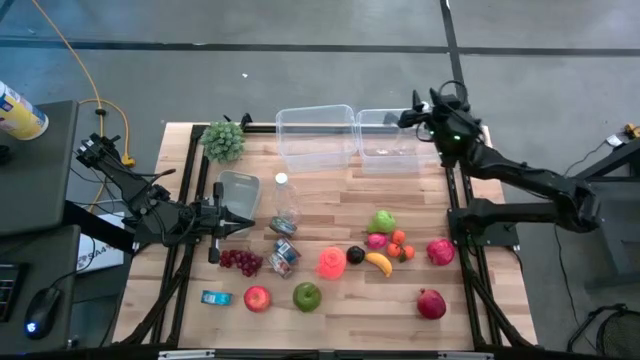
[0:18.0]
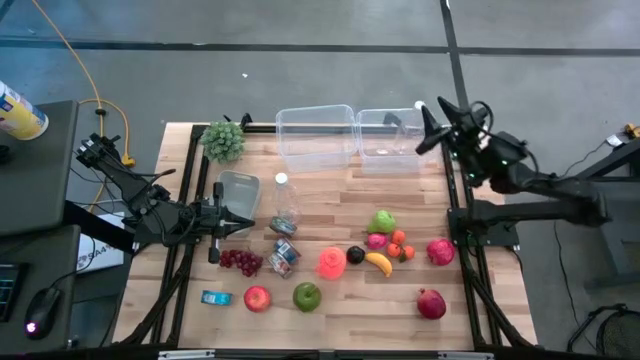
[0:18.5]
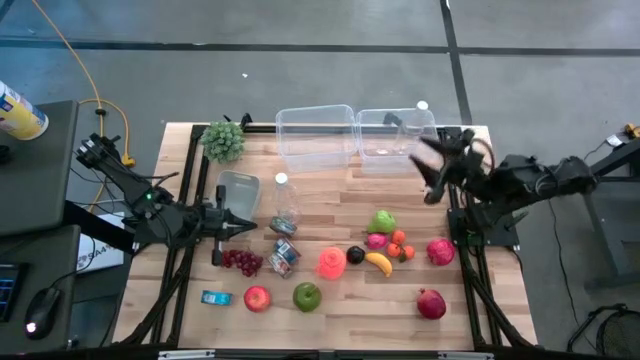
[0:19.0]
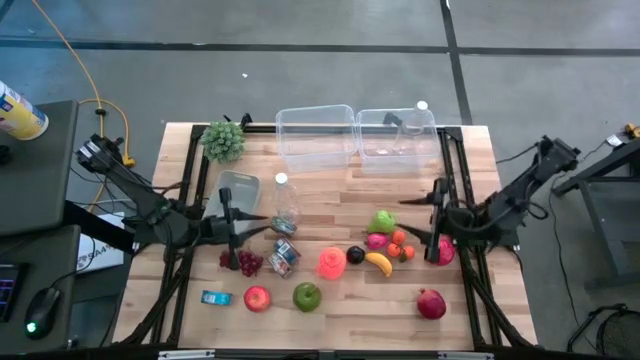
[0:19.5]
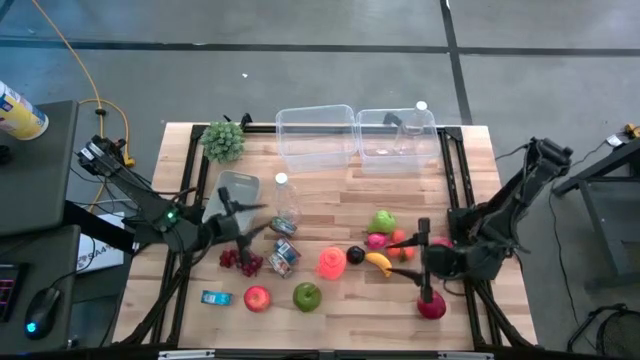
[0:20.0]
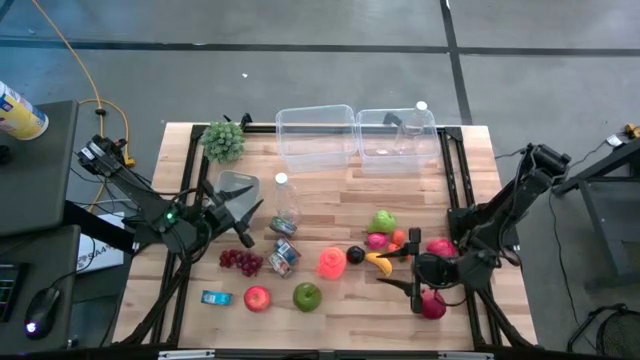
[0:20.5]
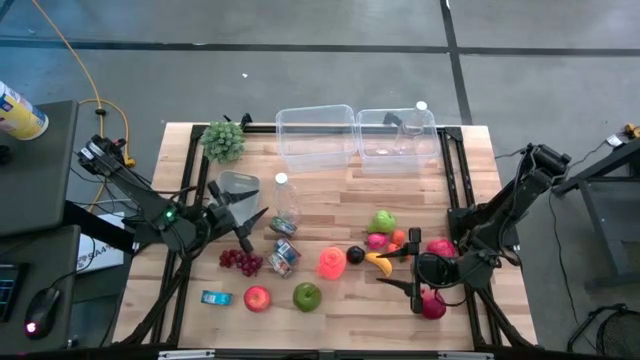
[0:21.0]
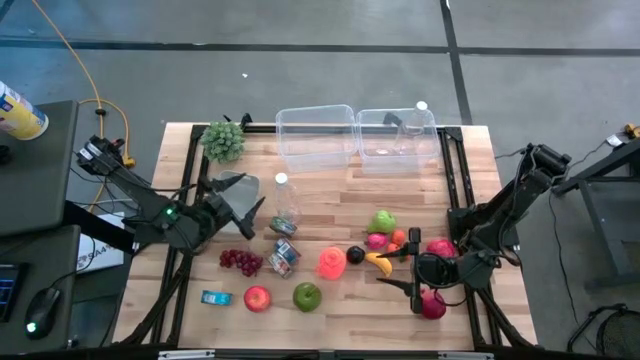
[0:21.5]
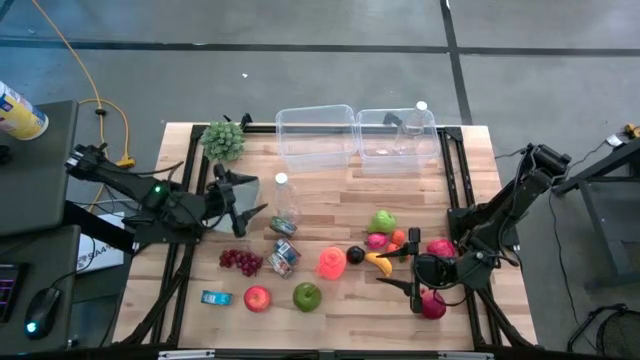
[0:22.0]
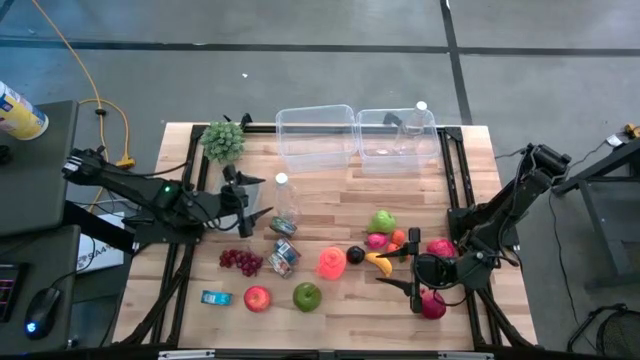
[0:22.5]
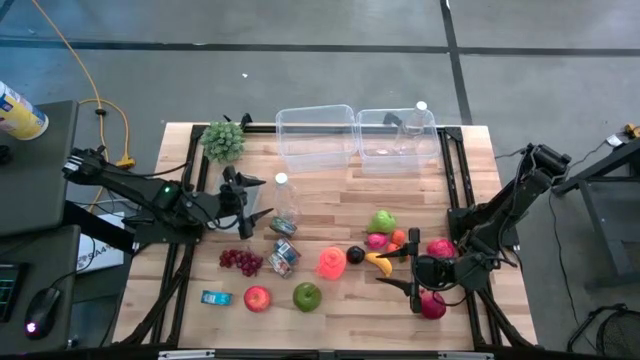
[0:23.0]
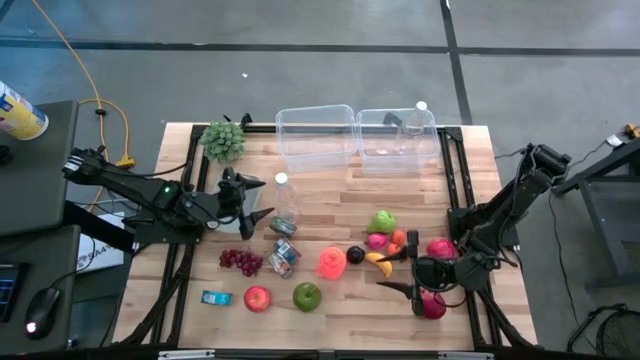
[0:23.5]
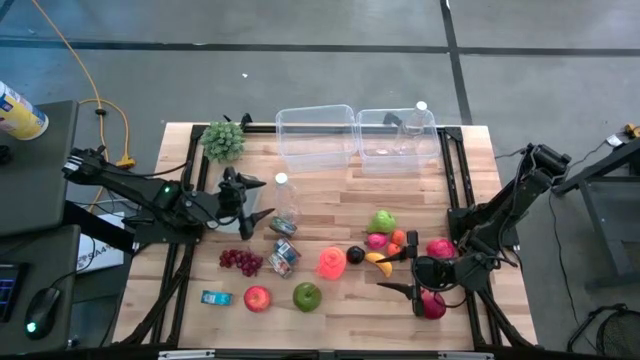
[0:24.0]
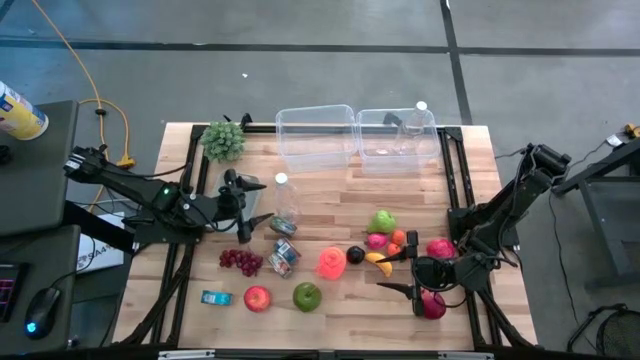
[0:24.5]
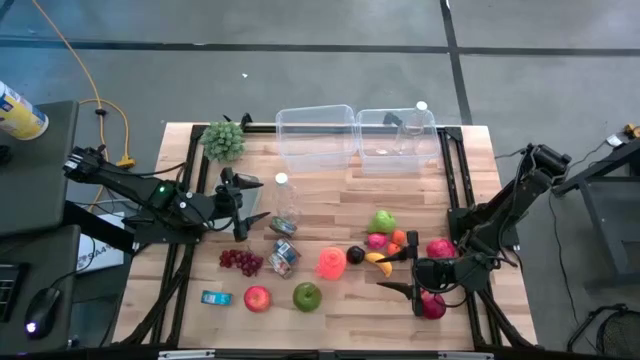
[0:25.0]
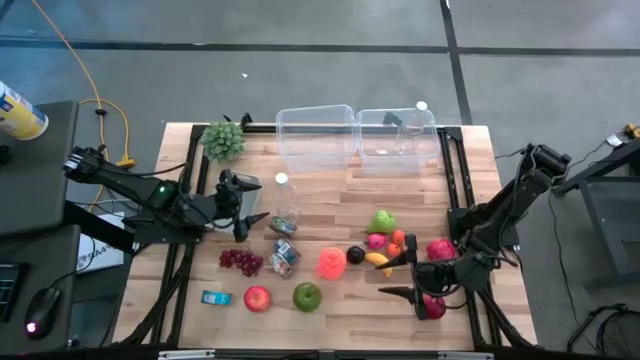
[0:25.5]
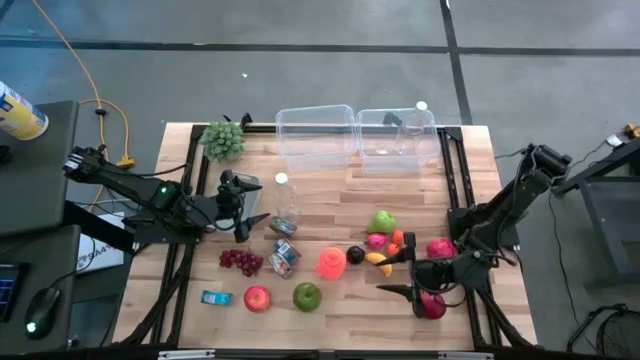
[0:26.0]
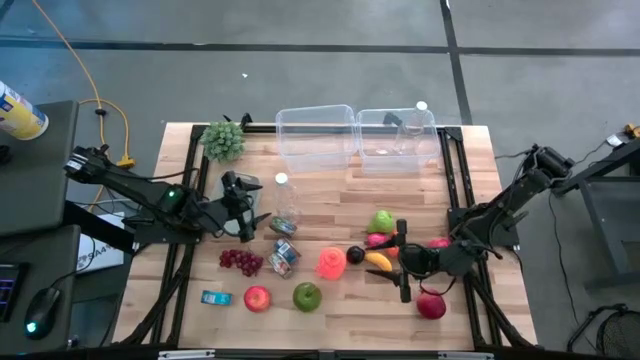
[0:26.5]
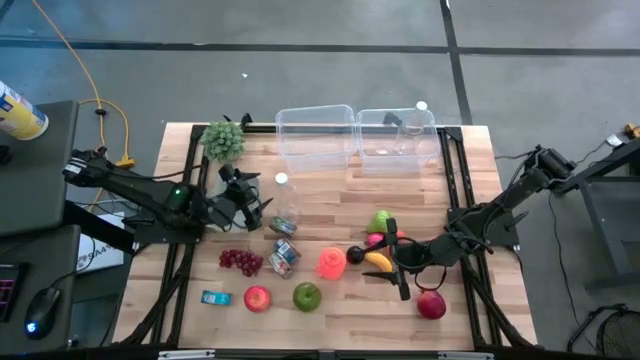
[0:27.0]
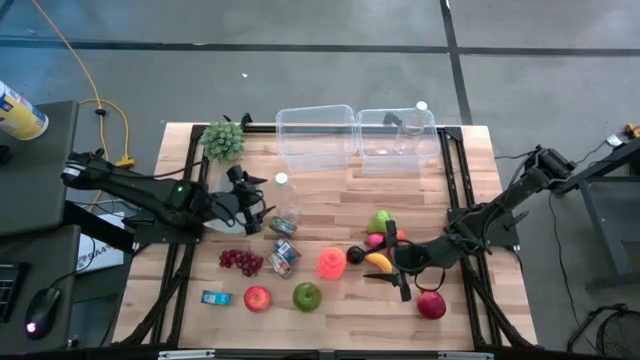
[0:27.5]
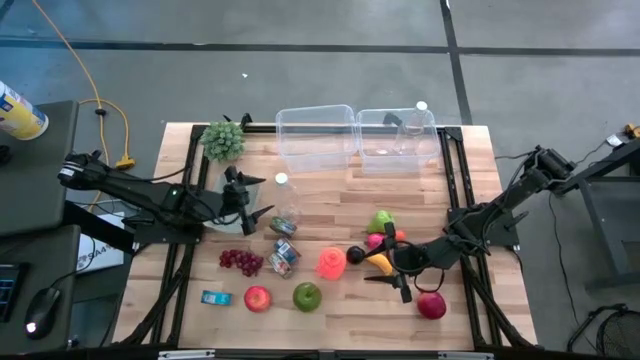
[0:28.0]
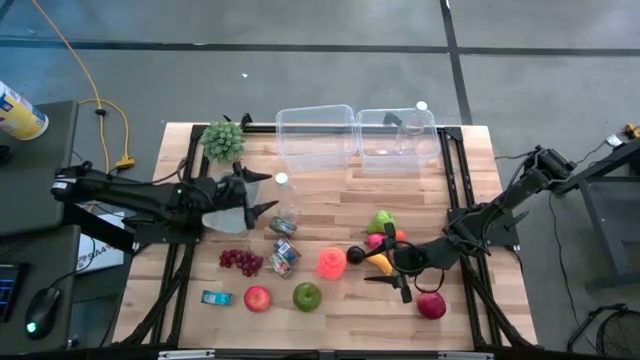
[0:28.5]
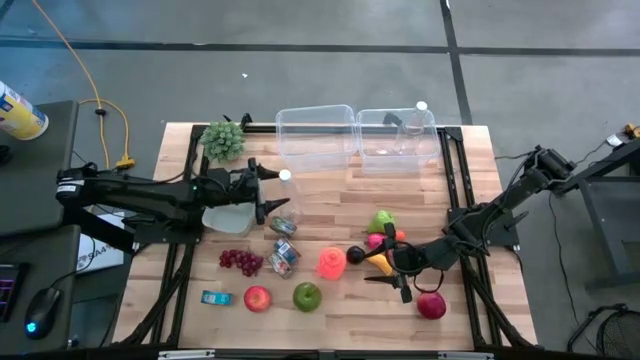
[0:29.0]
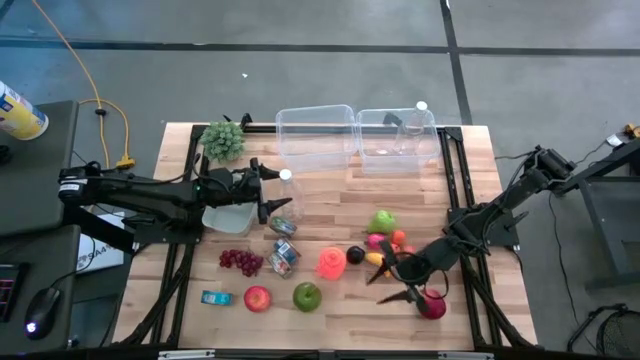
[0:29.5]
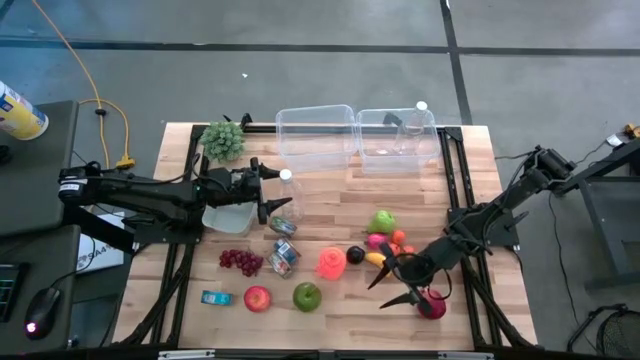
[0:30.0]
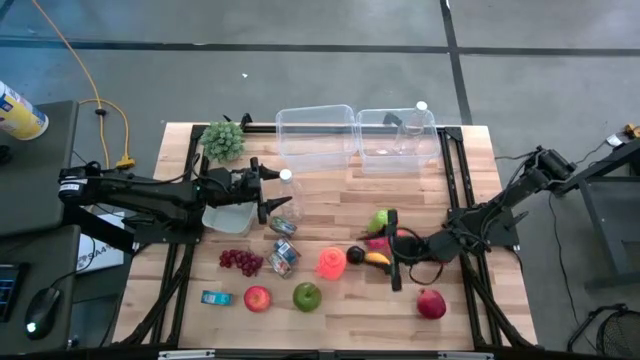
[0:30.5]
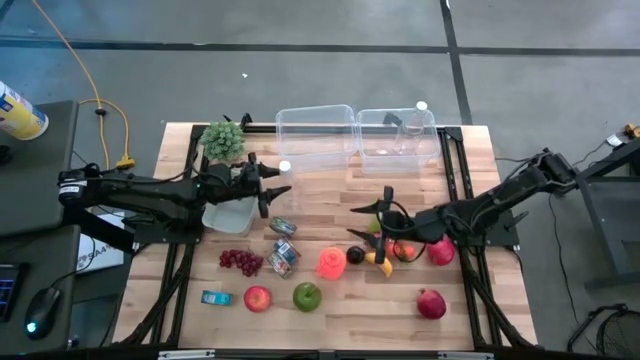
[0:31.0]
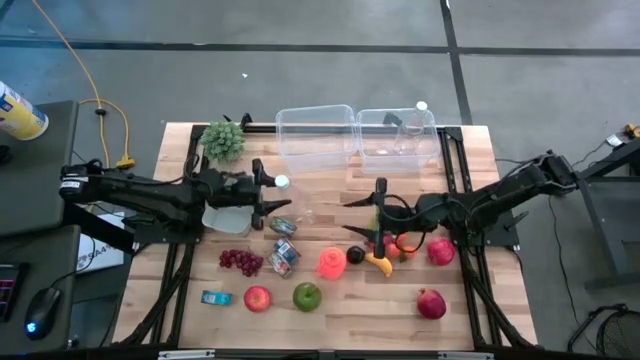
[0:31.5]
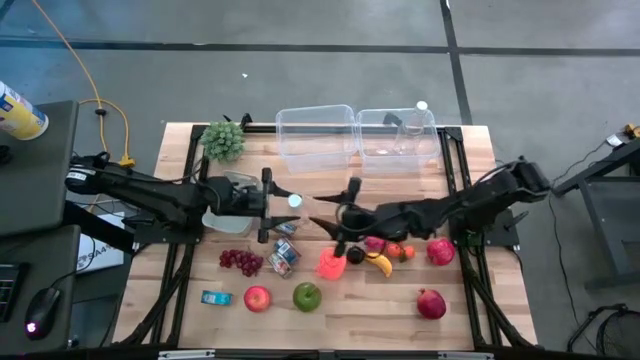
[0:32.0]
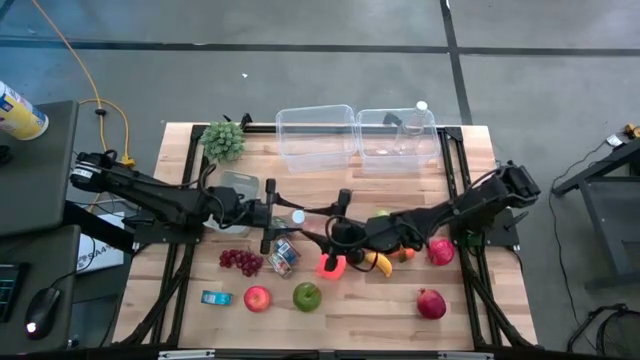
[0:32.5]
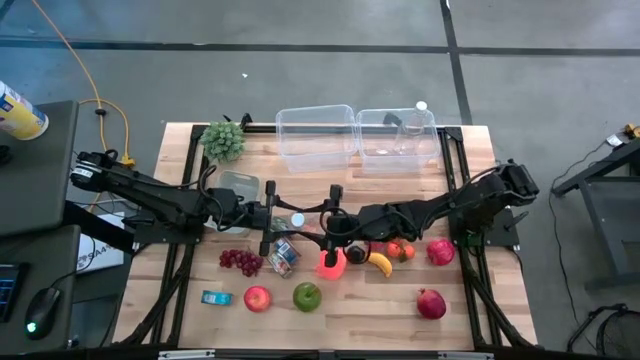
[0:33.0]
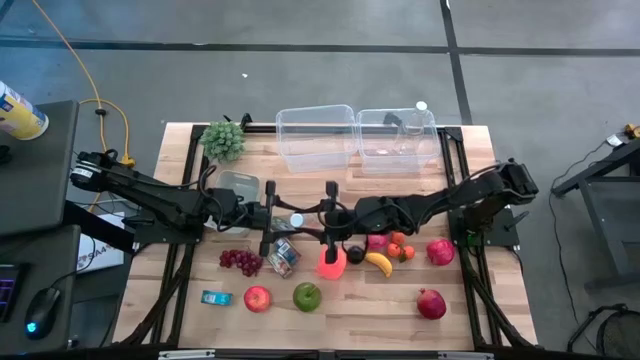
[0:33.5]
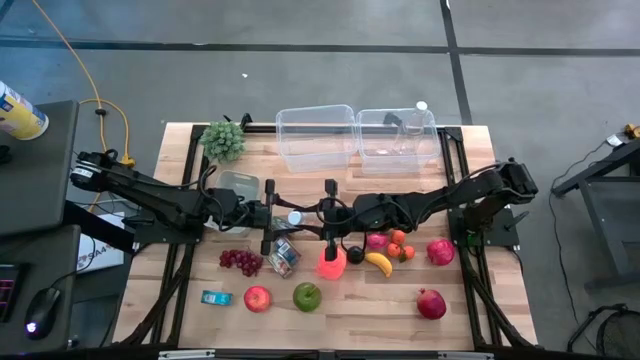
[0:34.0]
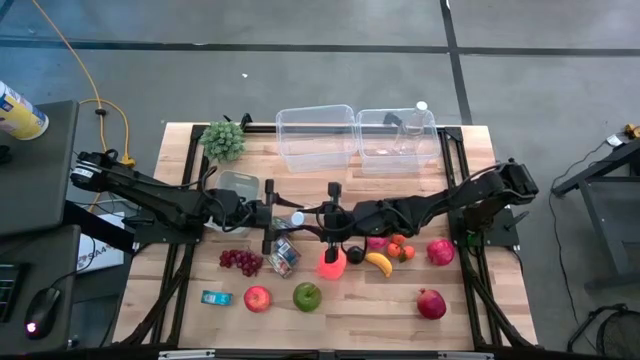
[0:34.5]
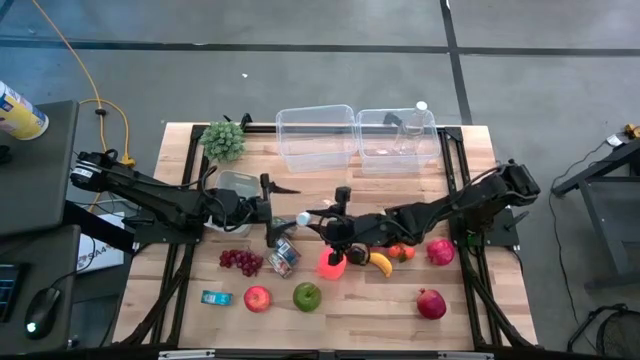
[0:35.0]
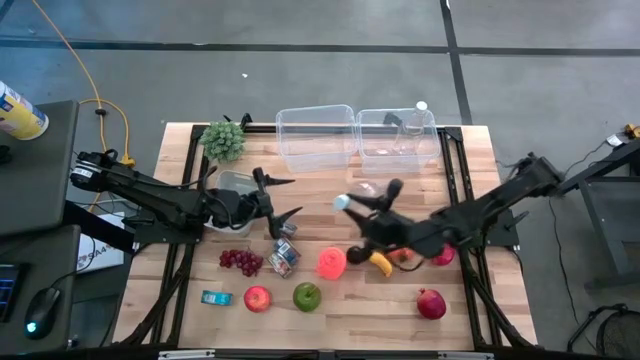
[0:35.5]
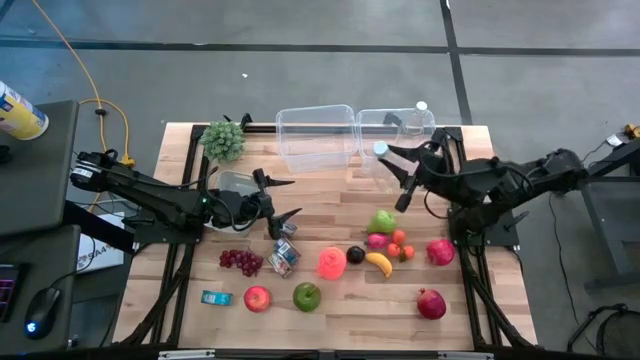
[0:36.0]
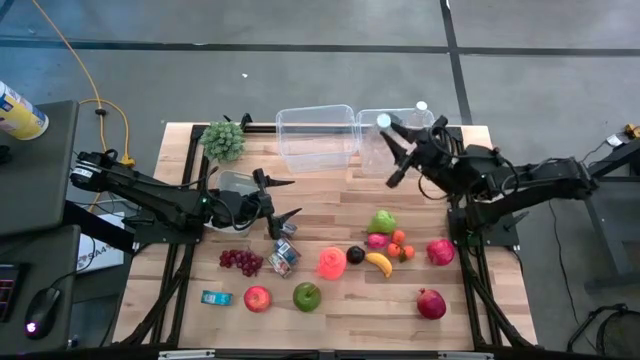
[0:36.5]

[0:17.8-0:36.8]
Task: Pick & Place Food Item
Put the transparent bottle into the right transparent bin

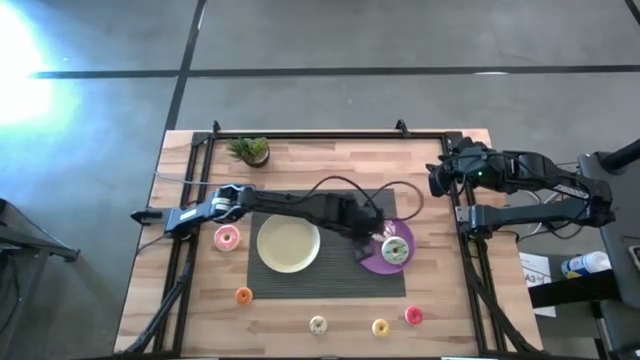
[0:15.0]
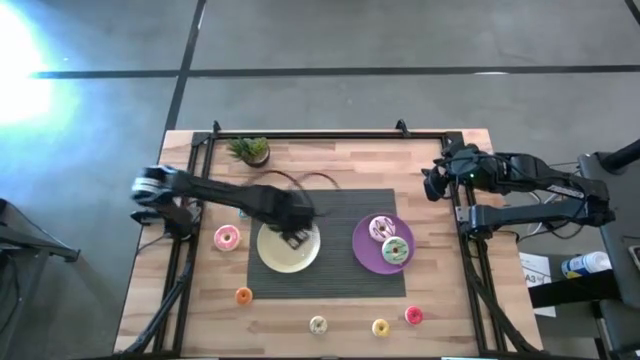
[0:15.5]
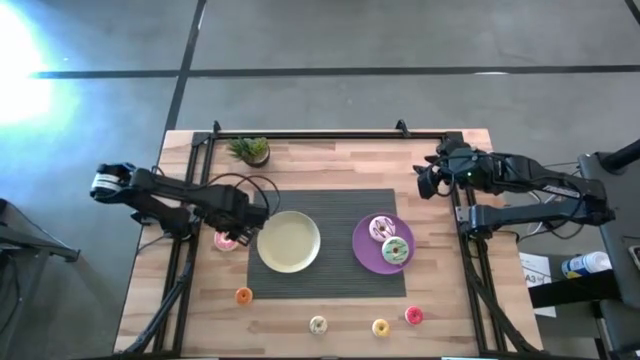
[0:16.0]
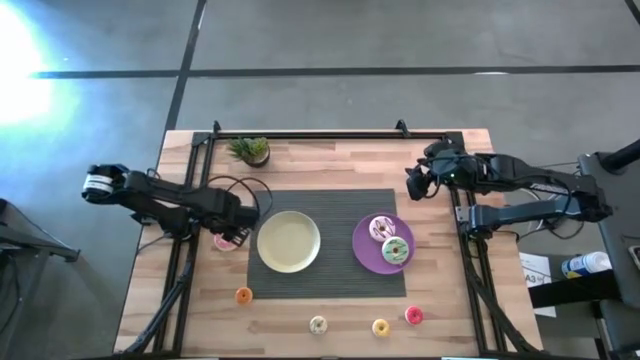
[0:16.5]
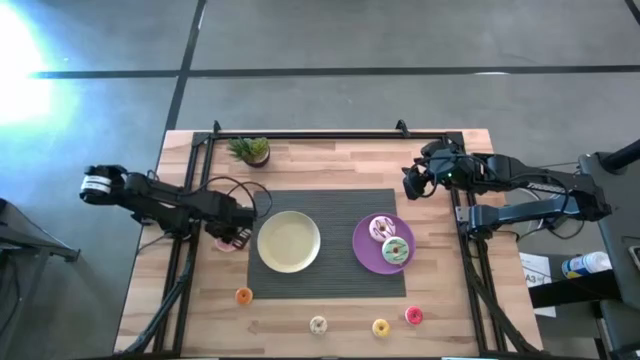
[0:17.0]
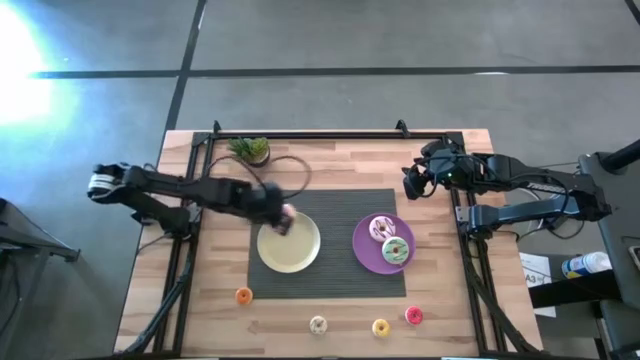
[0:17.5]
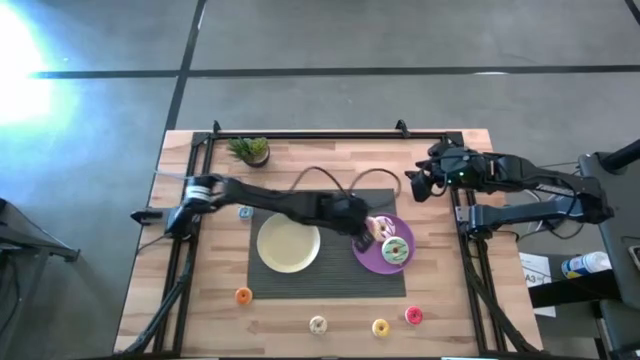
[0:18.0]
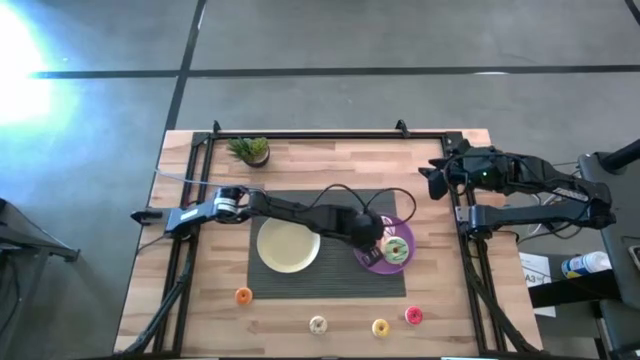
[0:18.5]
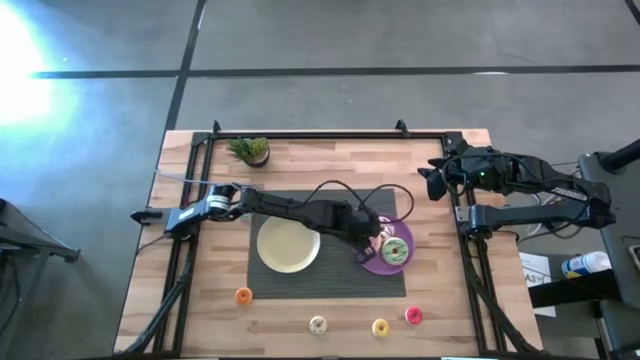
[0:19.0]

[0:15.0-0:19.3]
Task: Pick & Place donuts
Put the big pink donut on the purple plate
